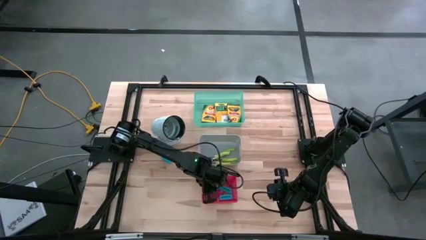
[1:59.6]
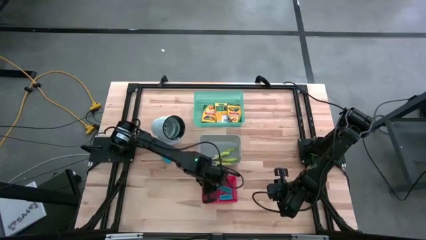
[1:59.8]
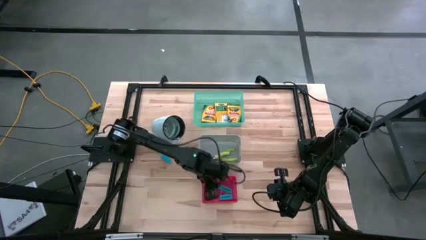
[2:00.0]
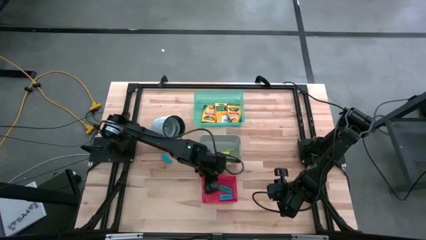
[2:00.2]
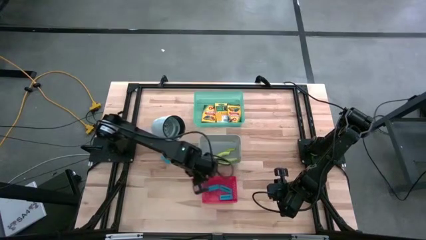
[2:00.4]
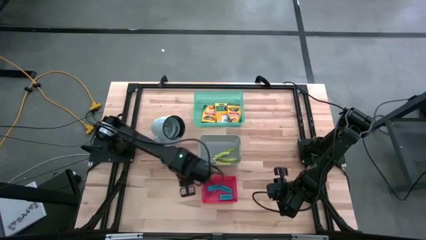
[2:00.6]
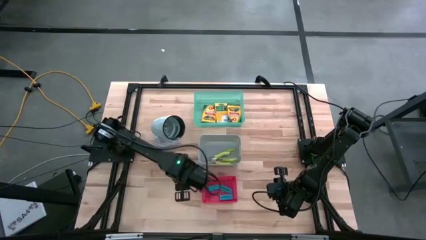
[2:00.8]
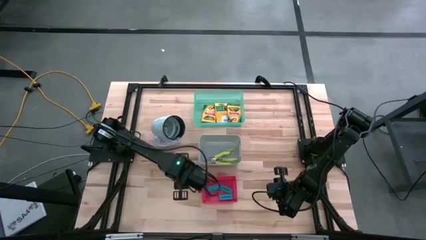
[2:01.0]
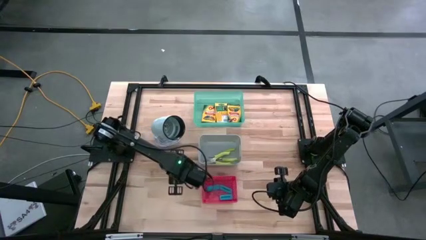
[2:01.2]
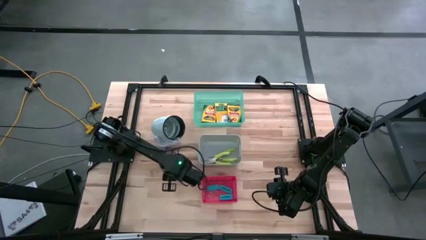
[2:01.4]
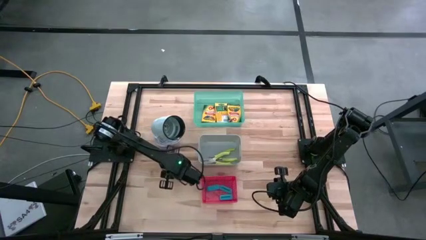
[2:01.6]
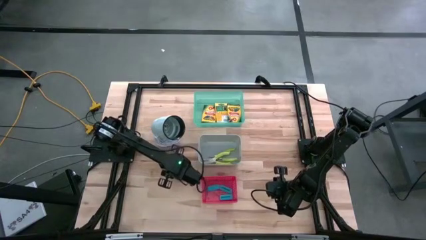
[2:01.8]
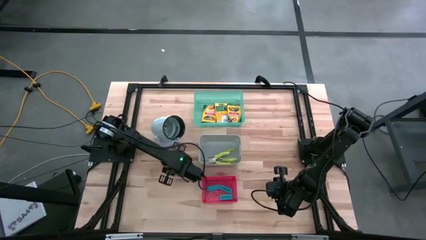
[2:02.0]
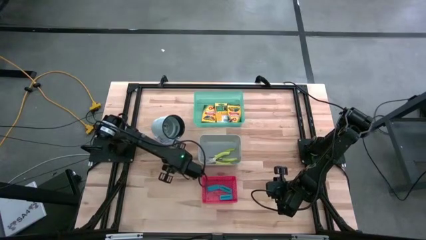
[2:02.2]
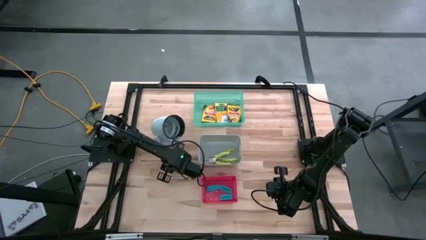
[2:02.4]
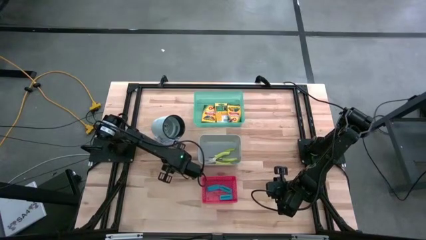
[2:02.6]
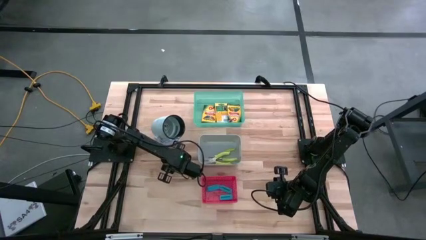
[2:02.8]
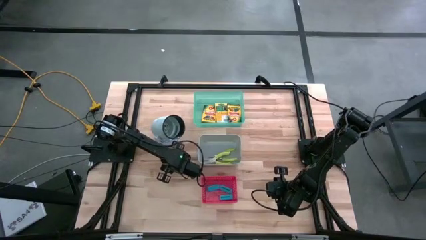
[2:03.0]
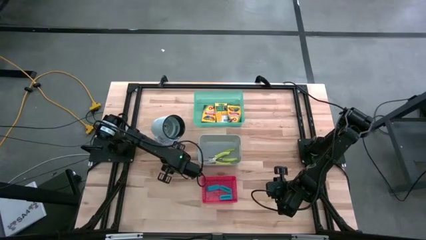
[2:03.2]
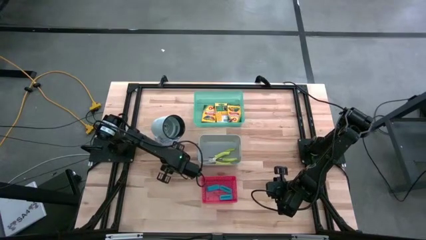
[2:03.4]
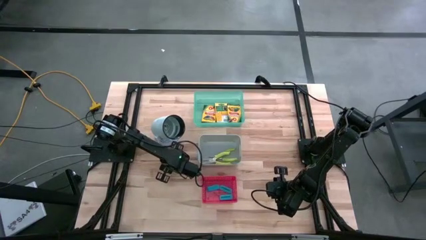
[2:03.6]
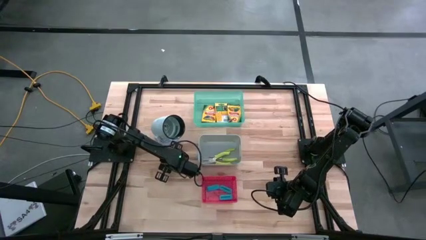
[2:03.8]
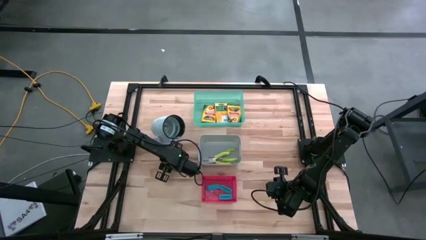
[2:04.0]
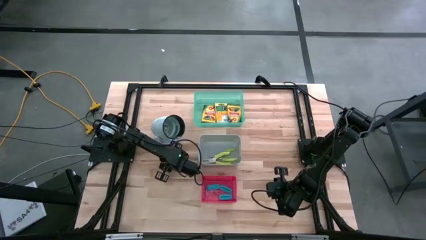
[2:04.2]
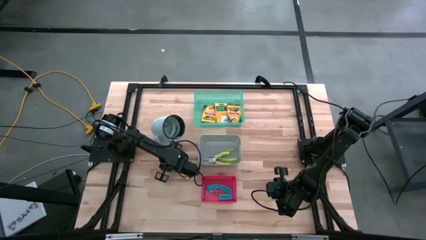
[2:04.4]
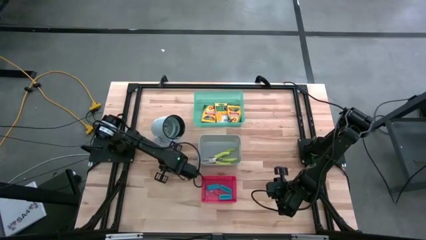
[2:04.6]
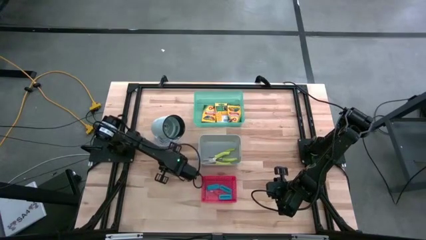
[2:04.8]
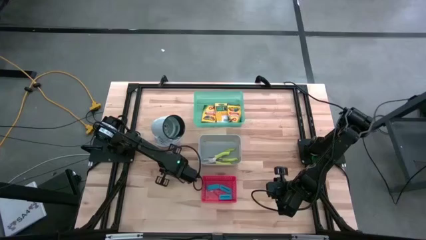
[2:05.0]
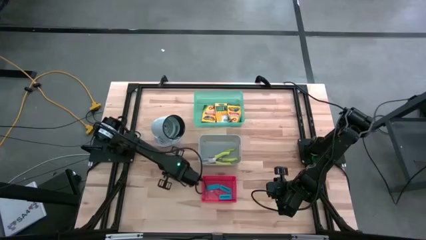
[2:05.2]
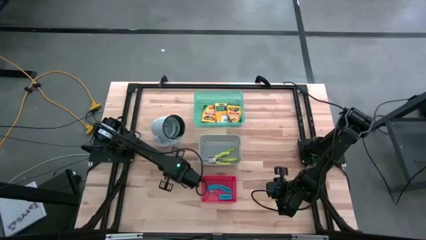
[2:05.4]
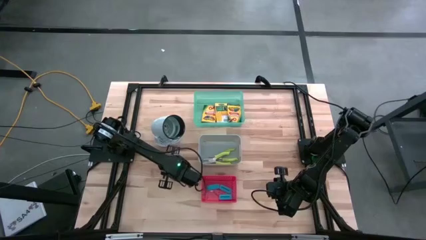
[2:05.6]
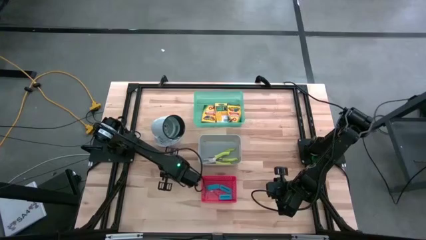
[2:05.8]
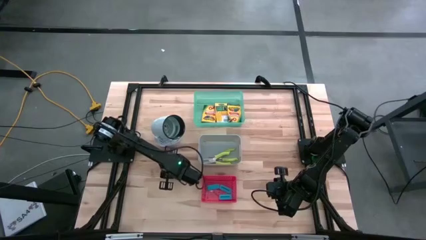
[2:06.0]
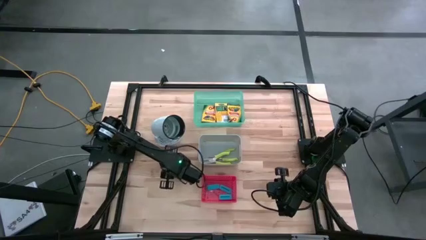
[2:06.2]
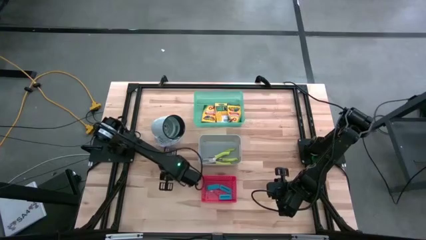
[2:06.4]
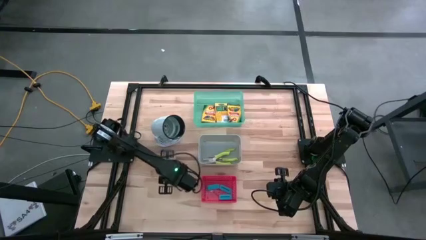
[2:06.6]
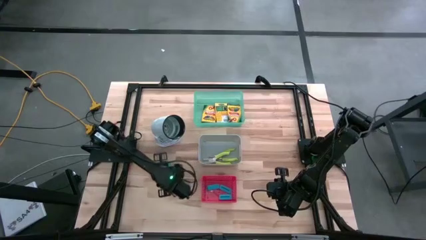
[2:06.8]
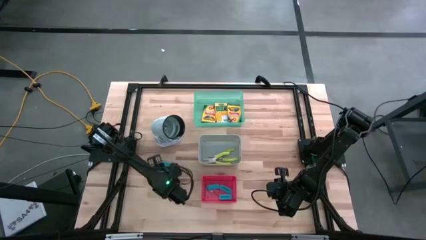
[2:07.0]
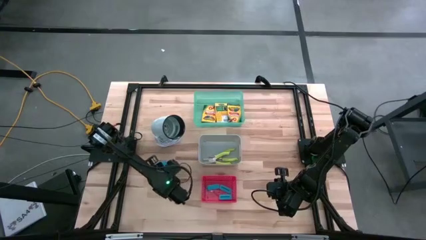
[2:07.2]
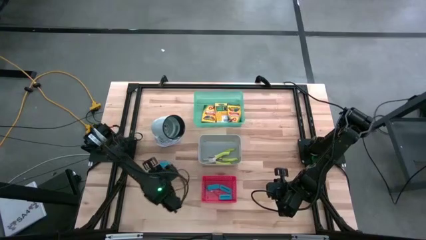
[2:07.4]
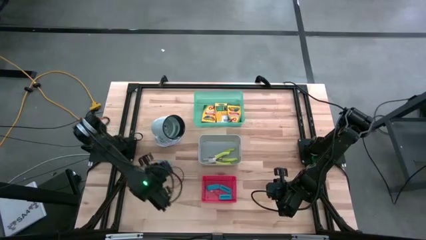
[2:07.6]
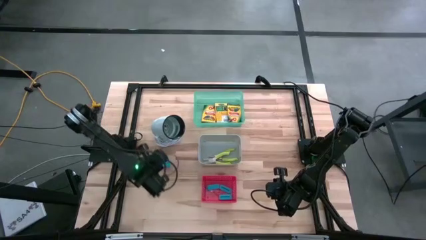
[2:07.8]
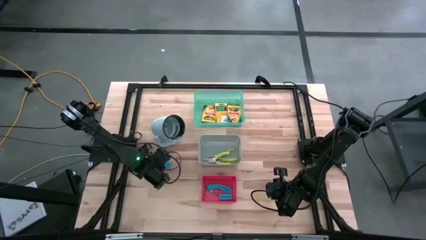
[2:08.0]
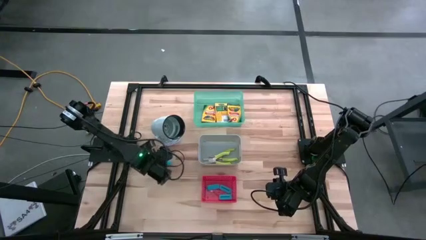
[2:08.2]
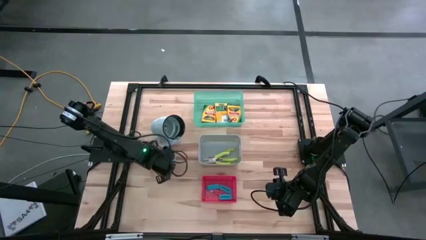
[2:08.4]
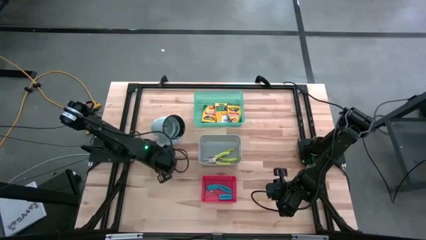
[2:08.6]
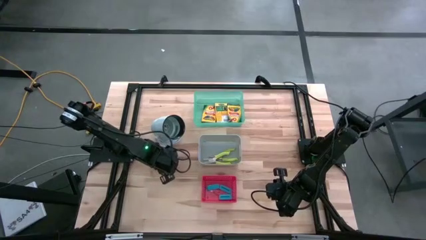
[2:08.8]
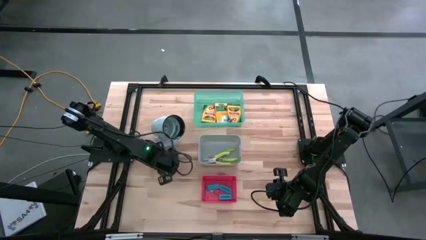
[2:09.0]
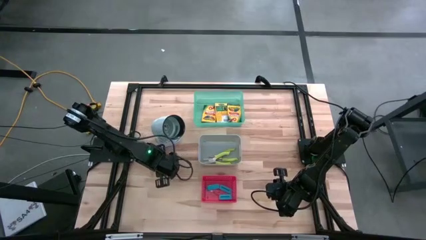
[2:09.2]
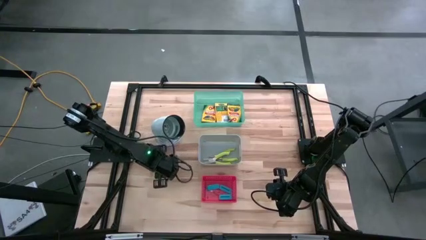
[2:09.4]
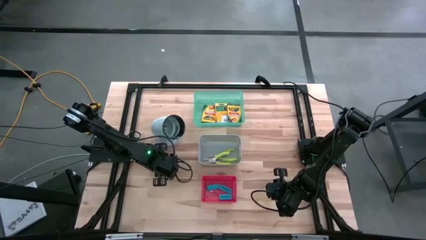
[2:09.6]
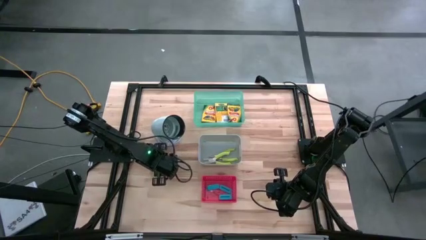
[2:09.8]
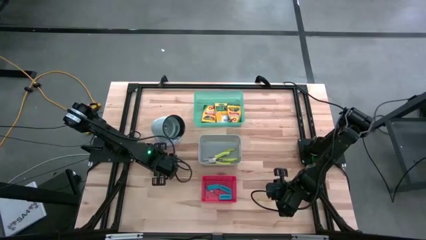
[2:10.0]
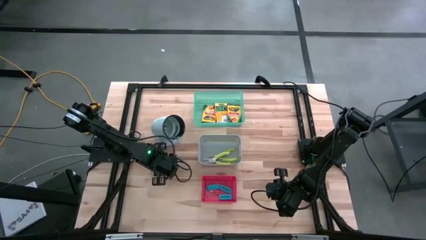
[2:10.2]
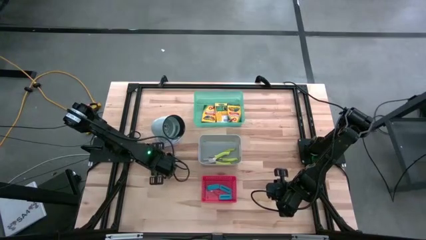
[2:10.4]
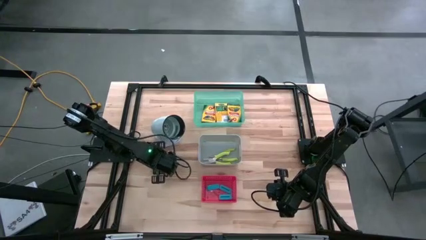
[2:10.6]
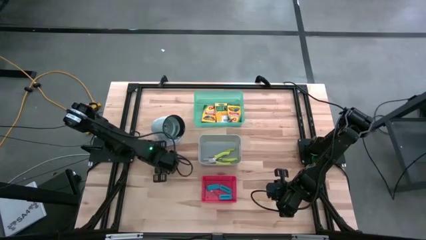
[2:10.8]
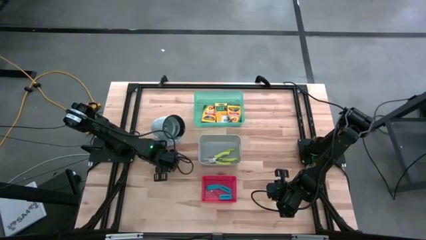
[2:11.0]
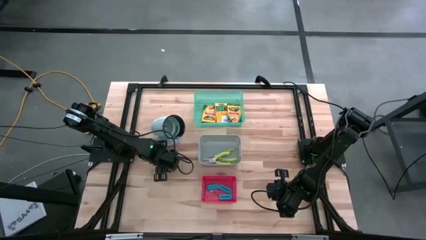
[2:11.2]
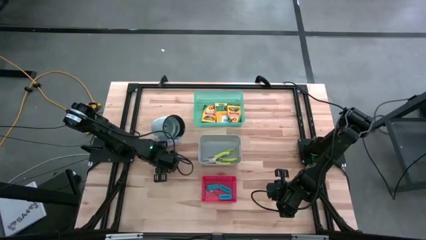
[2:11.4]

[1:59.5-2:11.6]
Task: Pick & Place School Supplies
Put the blue eraser into the red bin

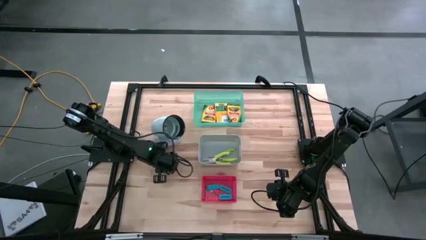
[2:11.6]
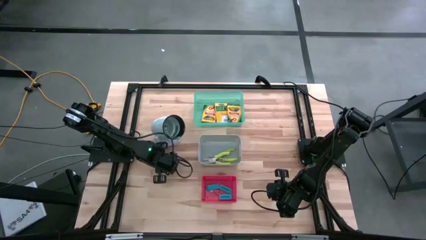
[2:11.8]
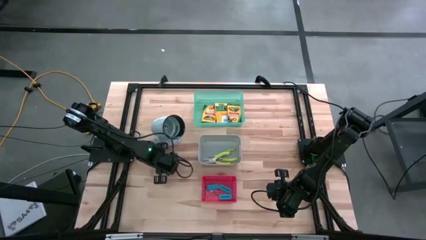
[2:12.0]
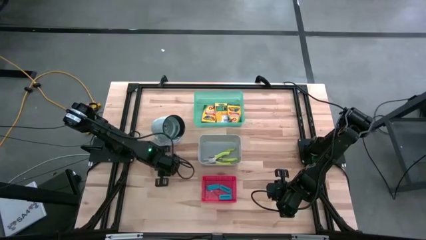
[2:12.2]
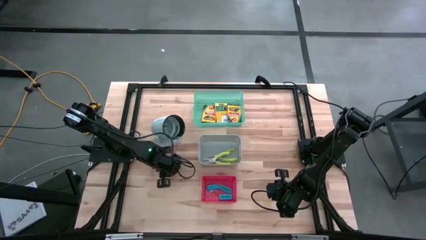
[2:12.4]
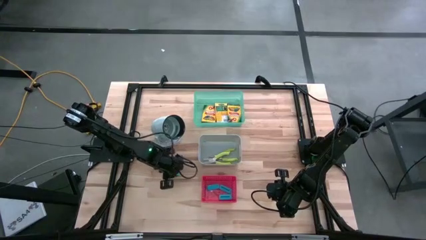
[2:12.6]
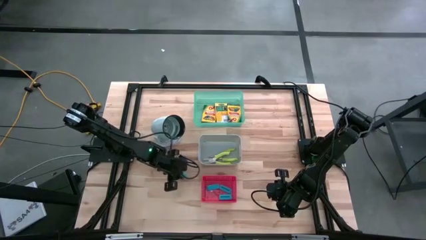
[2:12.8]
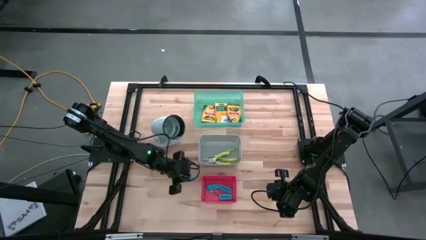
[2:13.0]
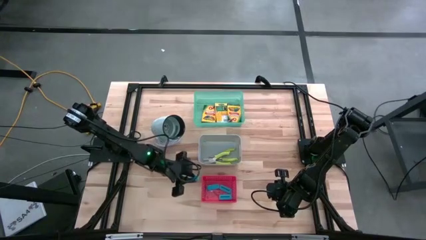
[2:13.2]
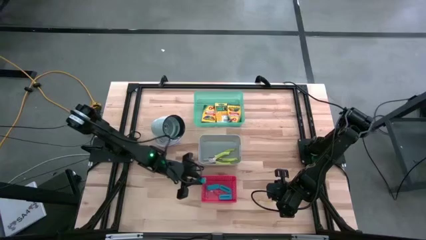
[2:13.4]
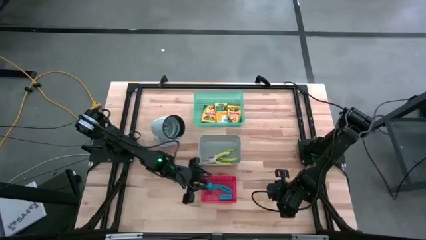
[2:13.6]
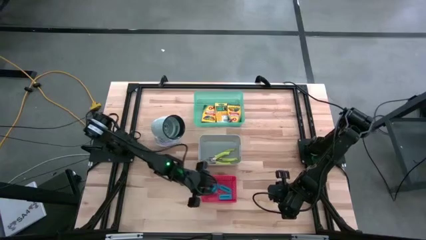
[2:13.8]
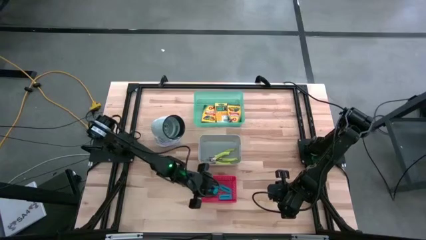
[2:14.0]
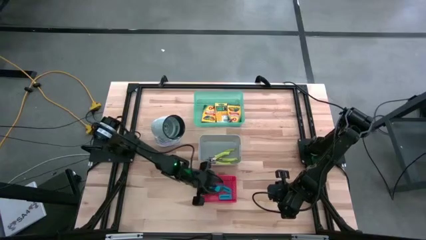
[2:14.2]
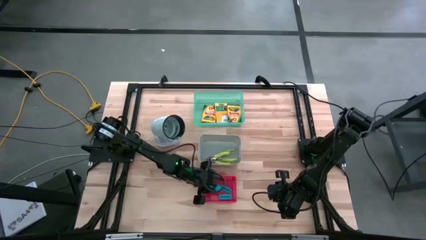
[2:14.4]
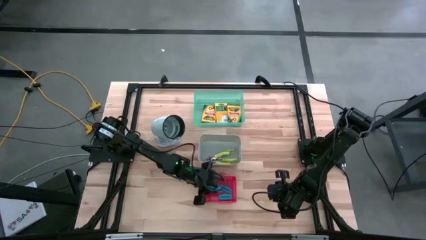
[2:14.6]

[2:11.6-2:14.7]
Put the blue eraser into the red bin
